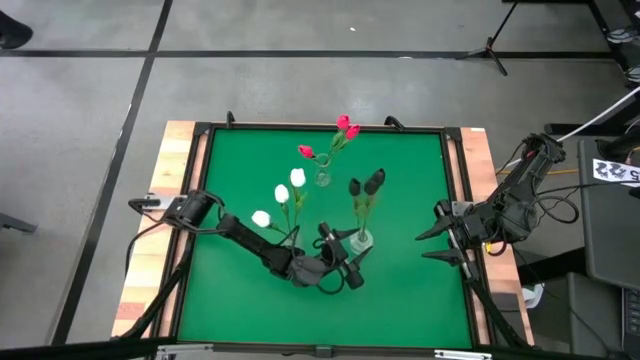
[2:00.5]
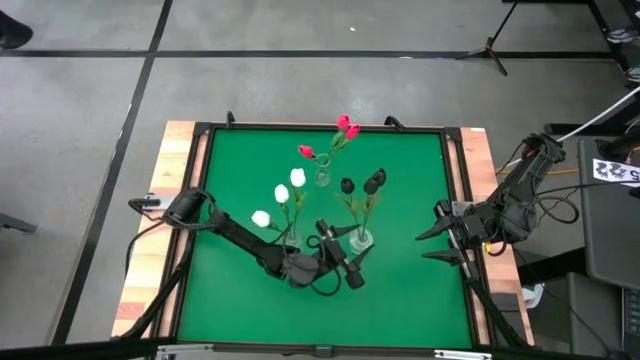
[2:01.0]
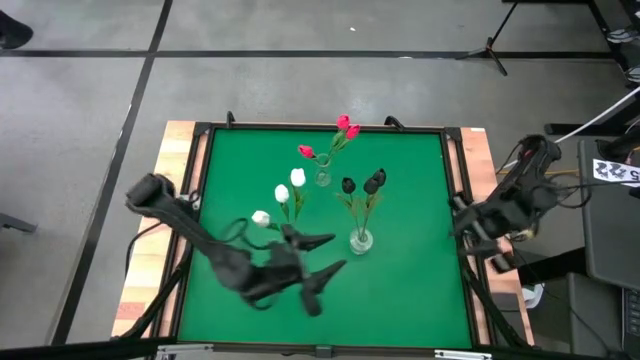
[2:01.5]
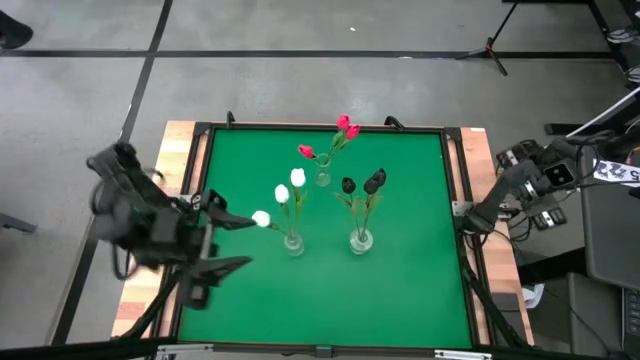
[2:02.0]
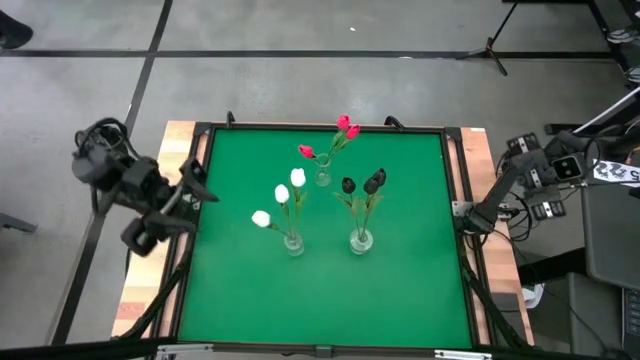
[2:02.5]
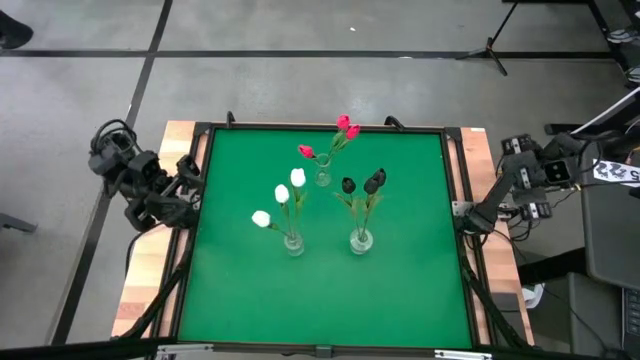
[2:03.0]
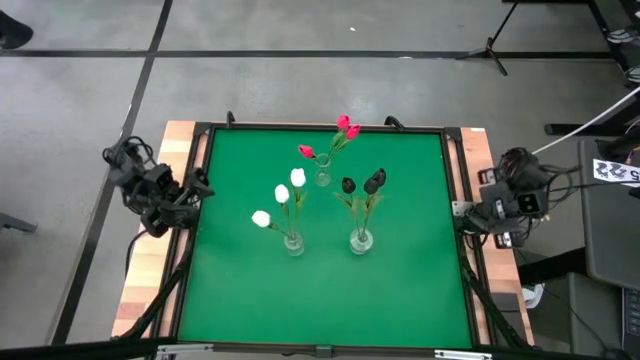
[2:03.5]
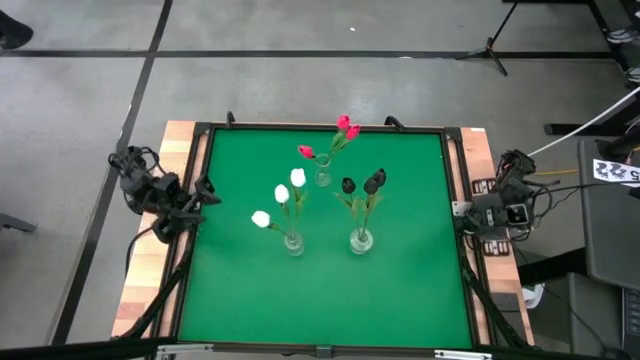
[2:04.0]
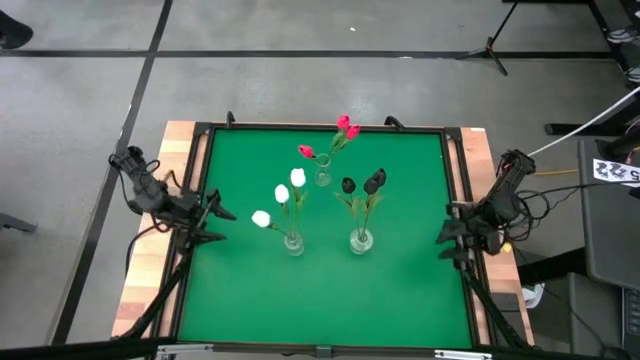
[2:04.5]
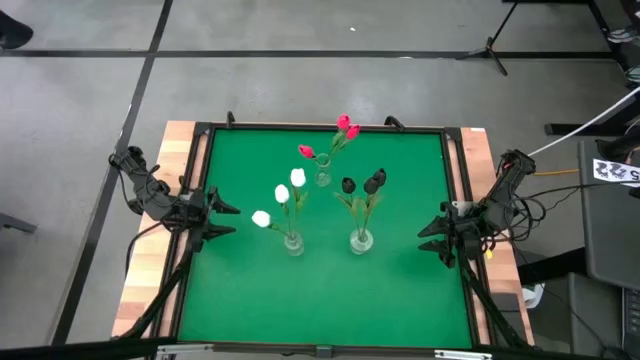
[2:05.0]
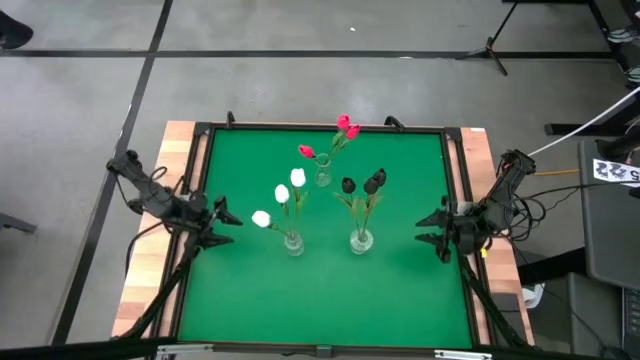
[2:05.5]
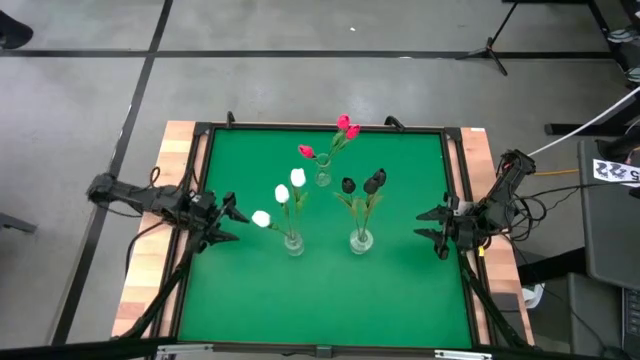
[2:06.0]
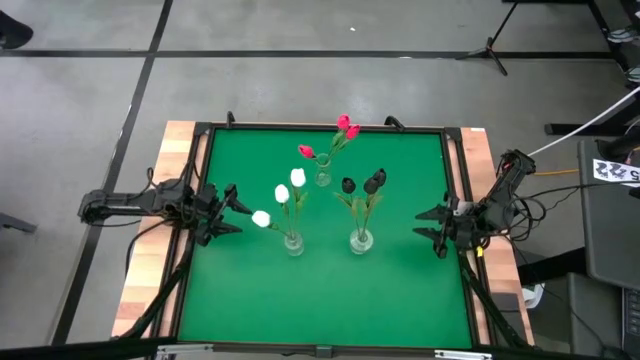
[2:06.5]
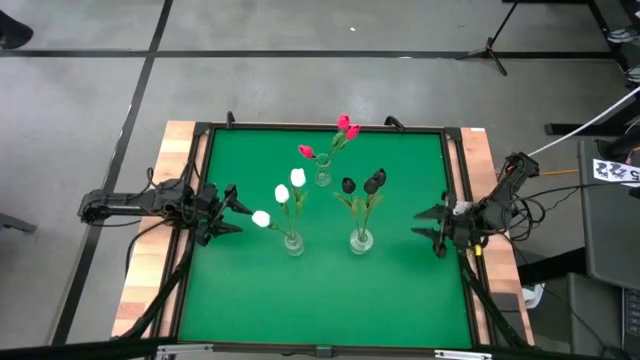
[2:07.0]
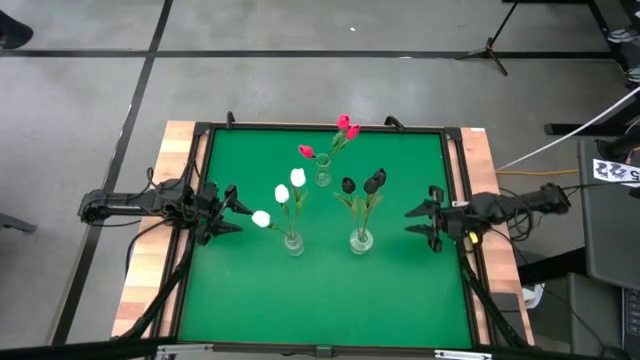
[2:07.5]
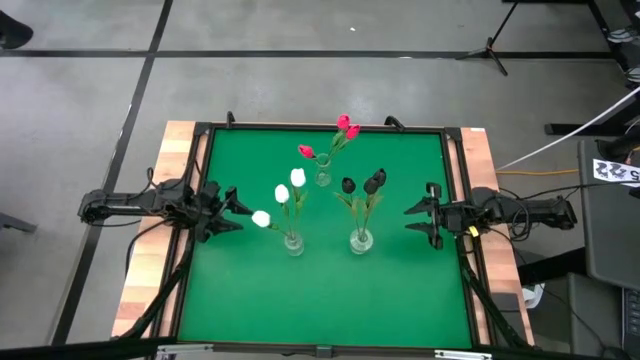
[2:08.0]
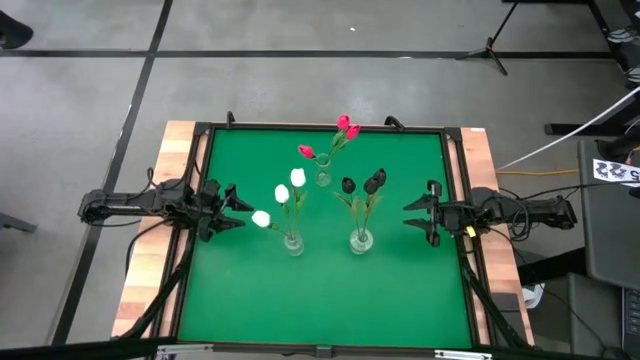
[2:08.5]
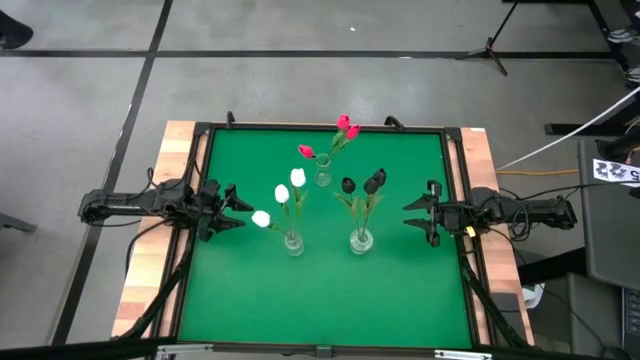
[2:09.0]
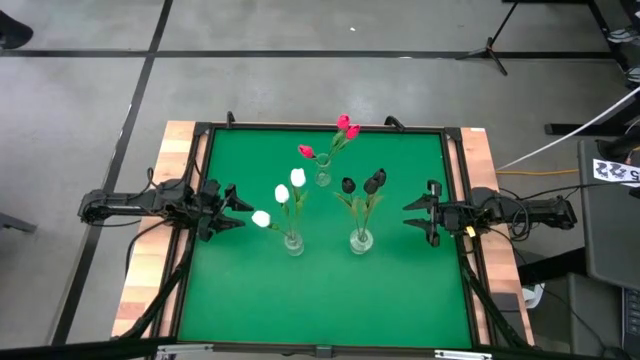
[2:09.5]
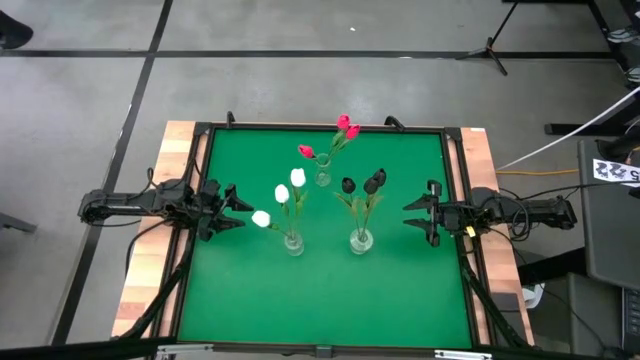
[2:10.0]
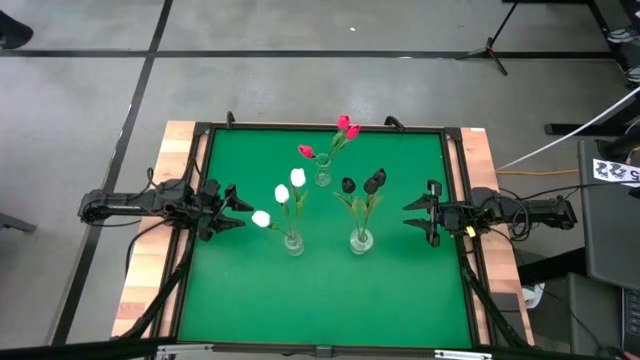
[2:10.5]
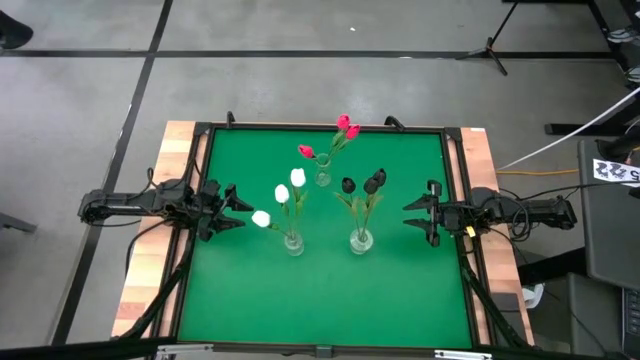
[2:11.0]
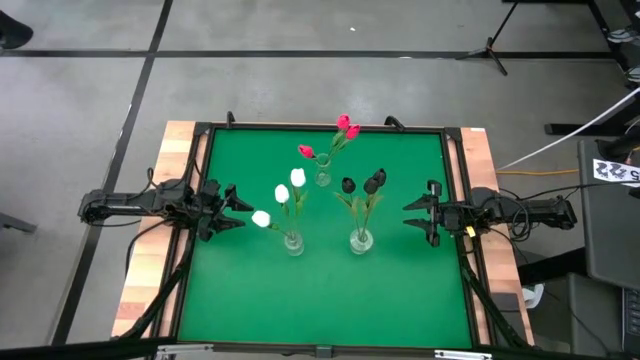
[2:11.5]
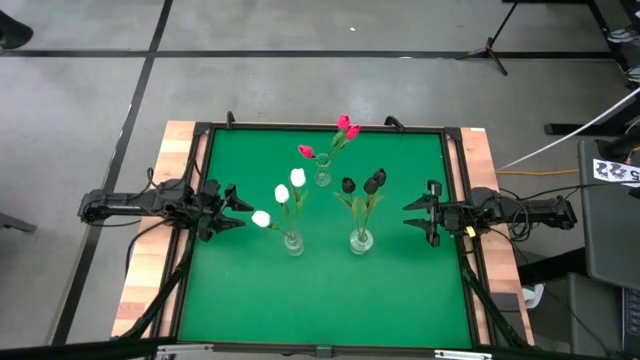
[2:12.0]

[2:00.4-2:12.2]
Task: Sort flowers into vase by color
Return to Home Position

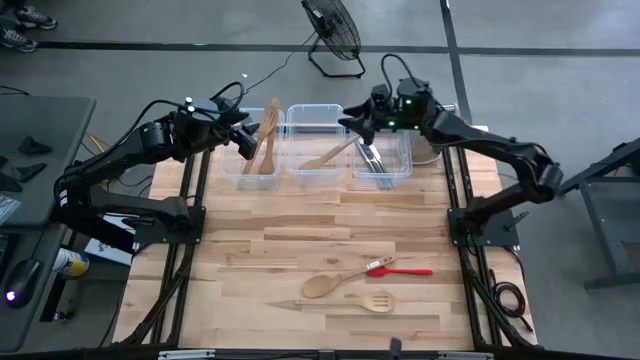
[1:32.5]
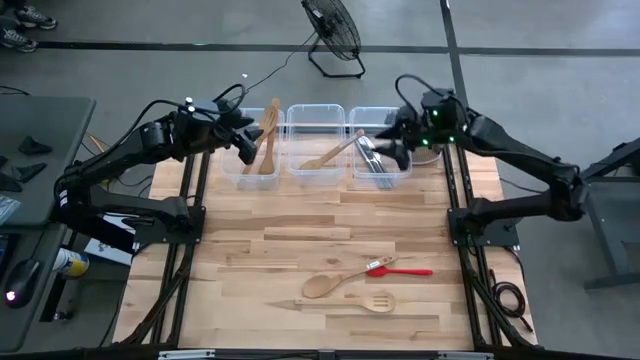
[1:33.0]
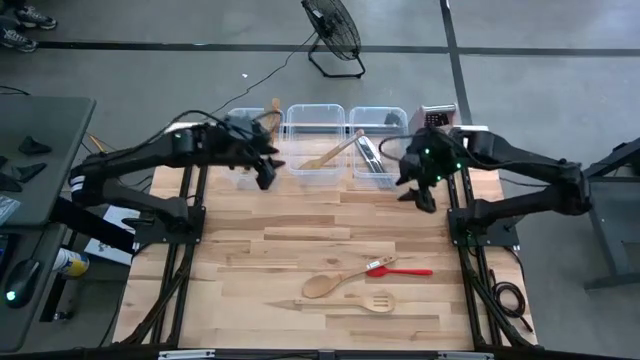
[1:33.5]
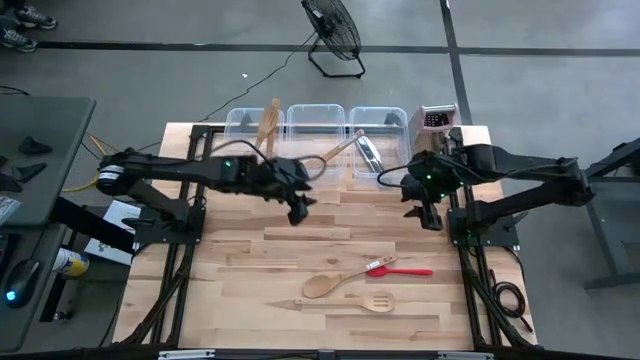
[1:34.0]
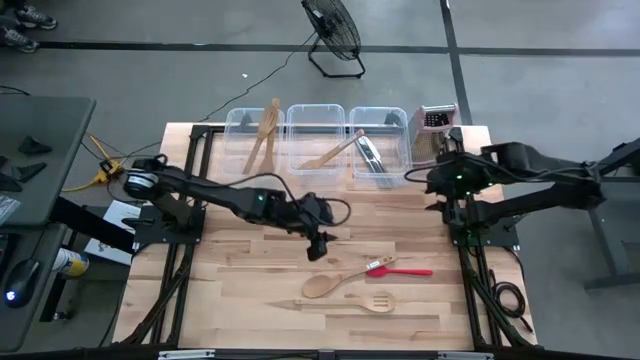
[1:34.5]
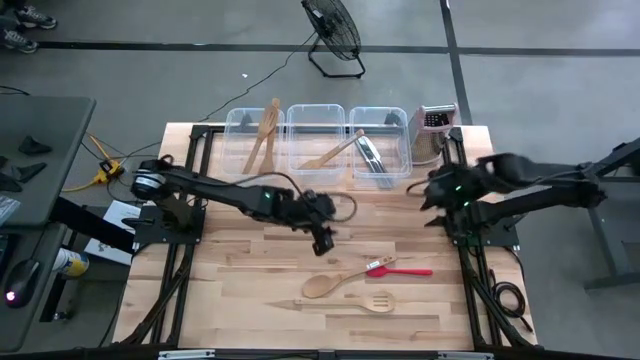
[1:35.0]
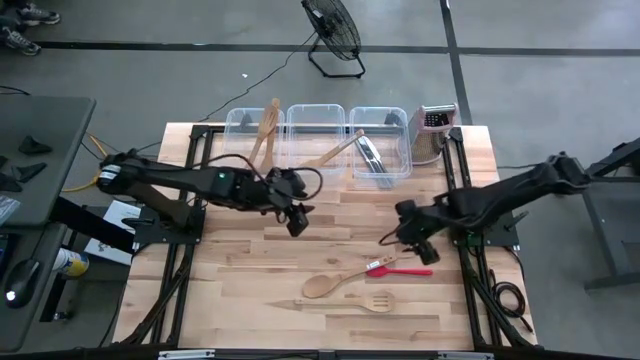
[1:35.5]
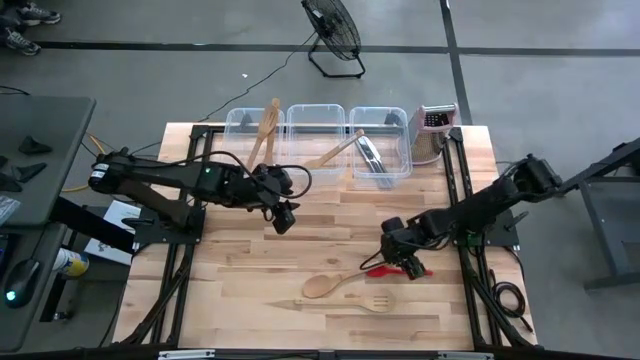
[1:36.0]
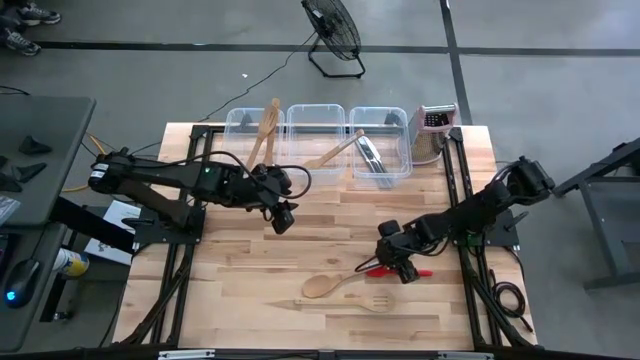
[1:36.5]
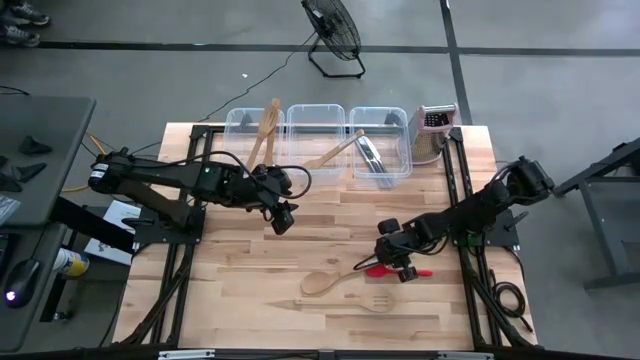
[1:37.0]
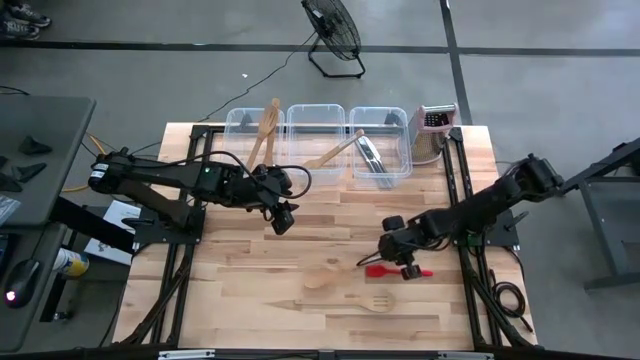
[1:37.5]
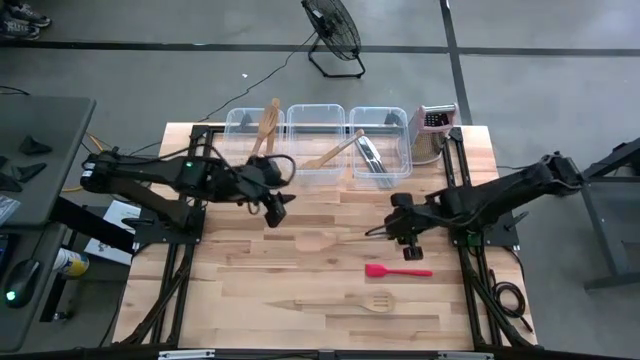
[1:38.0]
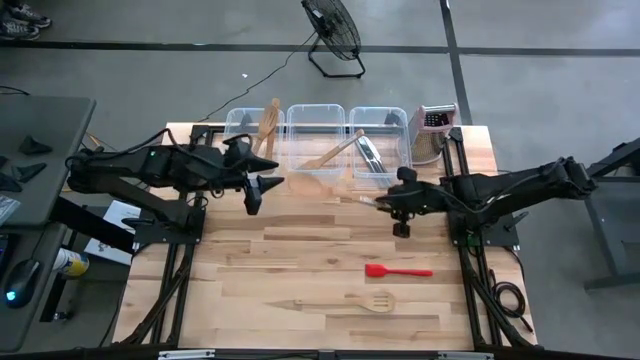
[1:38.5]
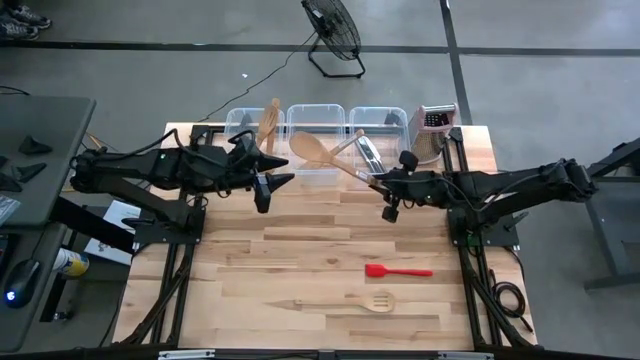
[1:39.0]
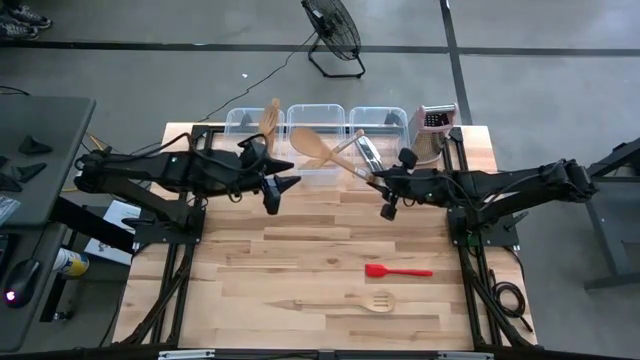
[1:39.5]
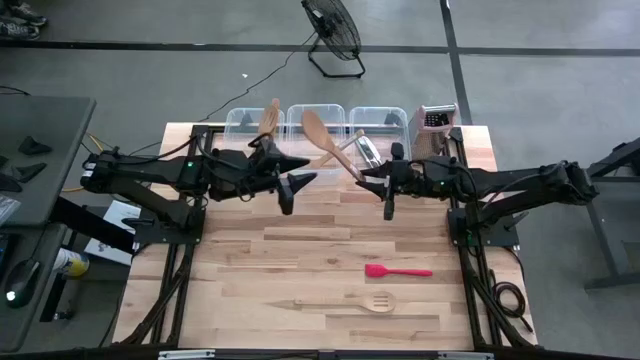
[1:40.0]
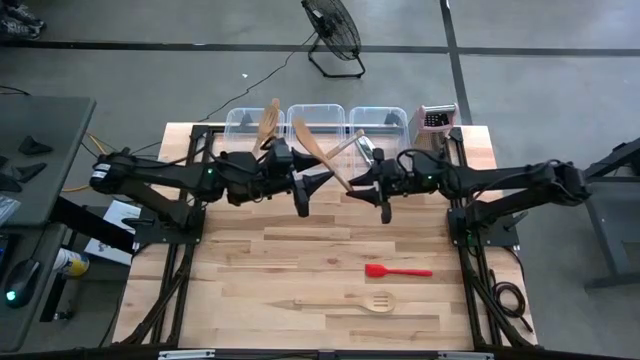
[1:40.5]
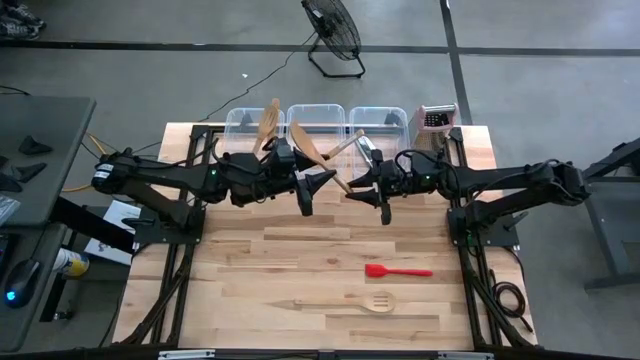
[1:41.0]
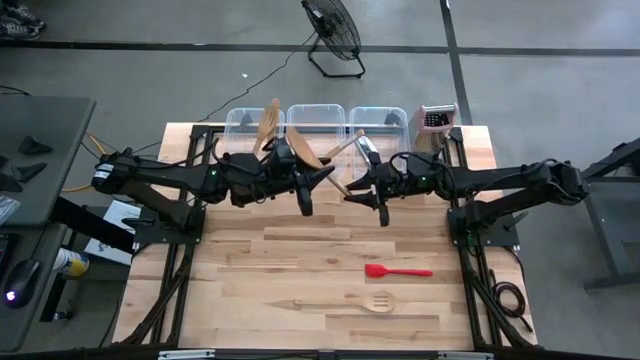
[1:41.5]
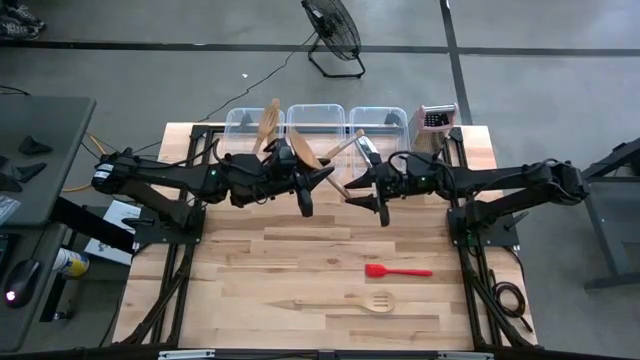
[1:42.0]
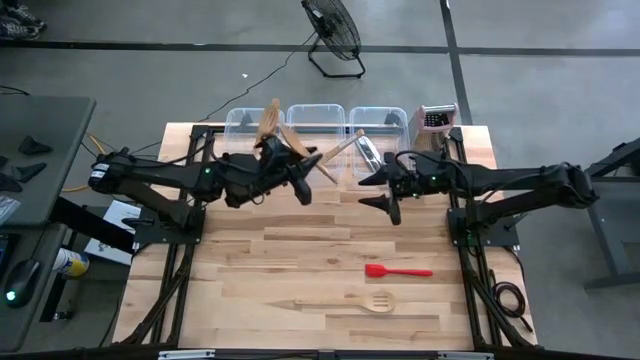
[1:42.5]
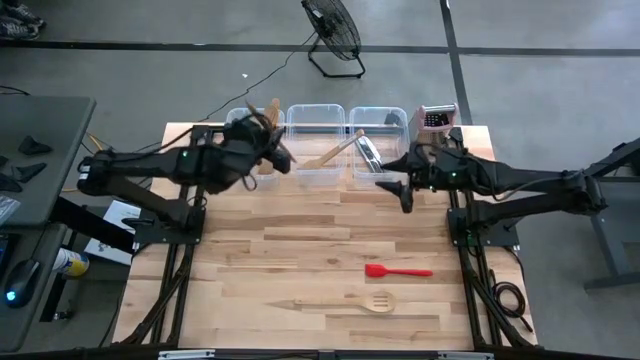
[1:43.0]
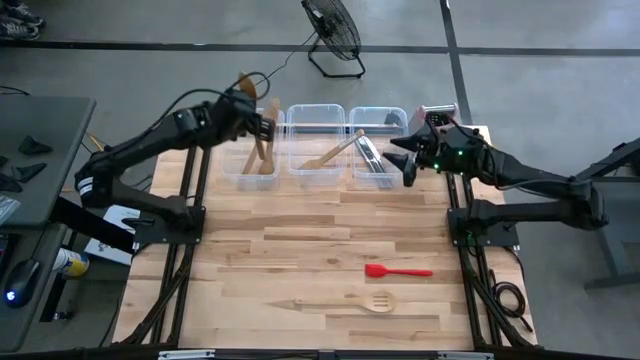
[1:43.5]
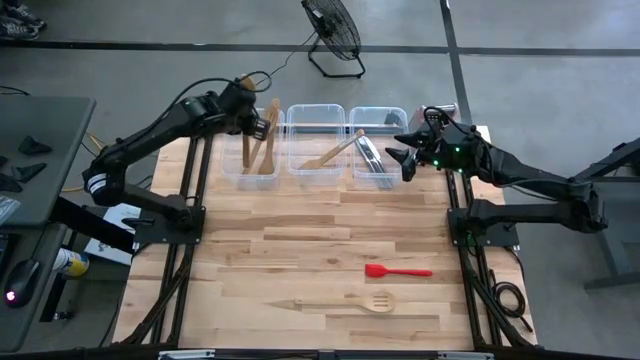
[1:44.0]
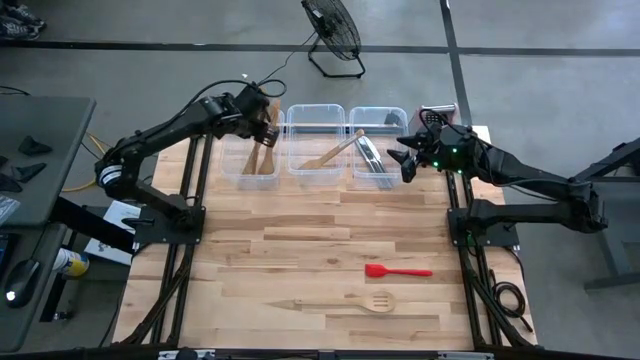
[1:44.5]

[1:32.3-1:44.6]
Task: Pick & Place Kitchen Items
Put the wooden serving spoon into the left transparent bin
